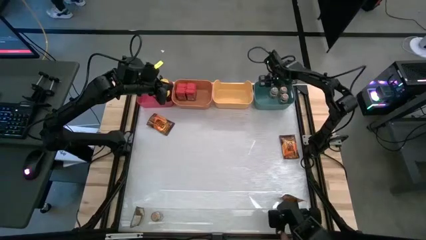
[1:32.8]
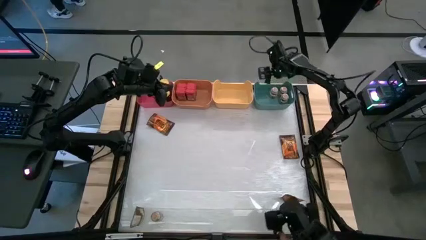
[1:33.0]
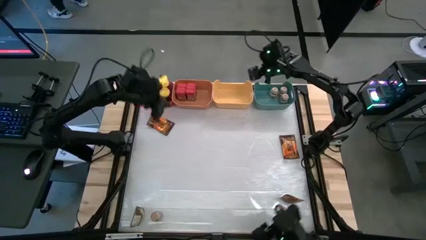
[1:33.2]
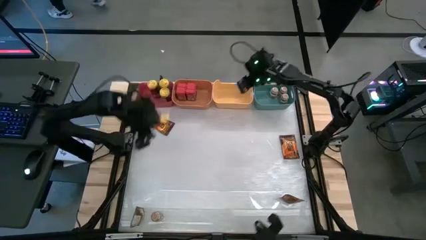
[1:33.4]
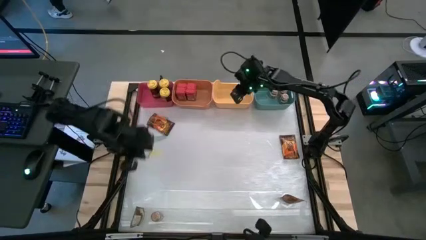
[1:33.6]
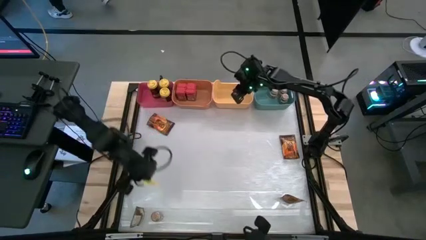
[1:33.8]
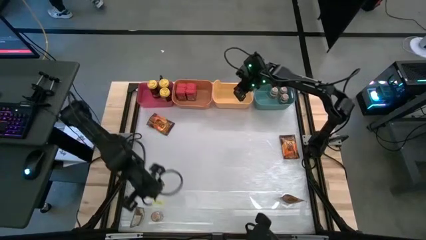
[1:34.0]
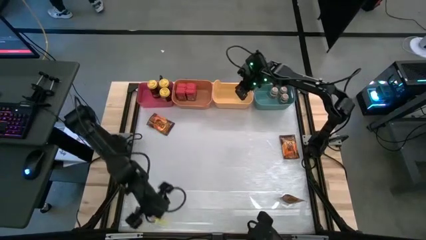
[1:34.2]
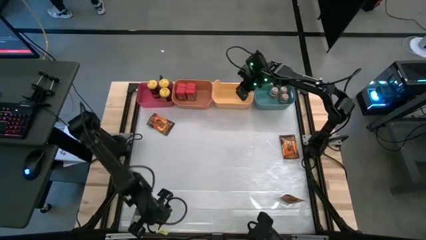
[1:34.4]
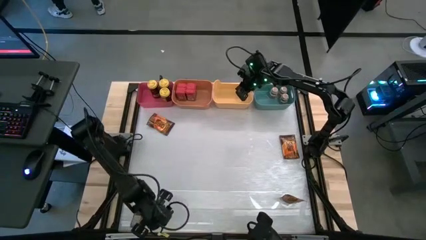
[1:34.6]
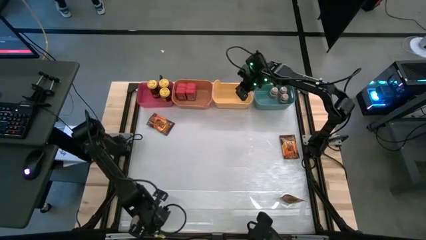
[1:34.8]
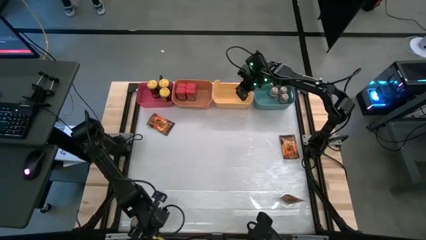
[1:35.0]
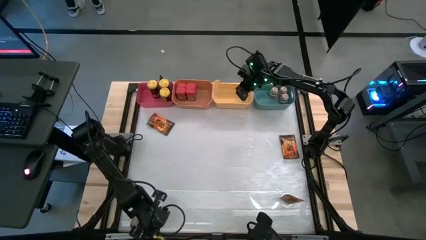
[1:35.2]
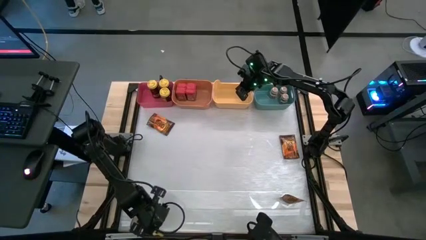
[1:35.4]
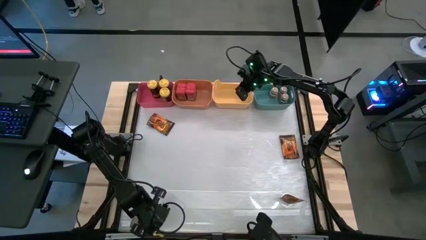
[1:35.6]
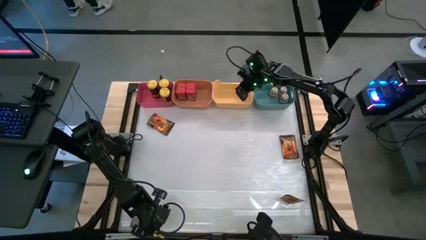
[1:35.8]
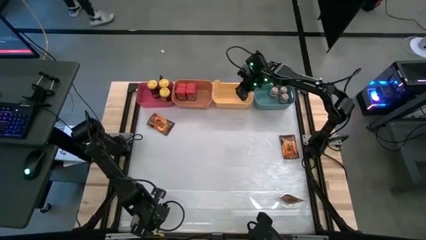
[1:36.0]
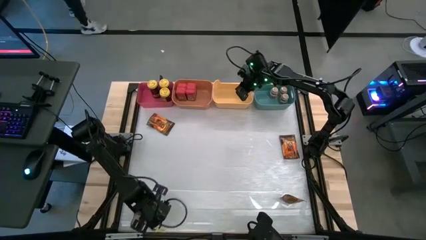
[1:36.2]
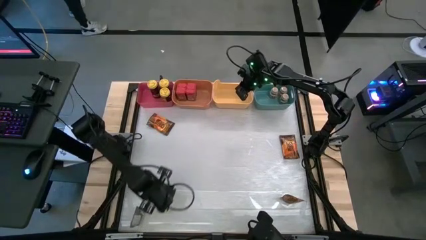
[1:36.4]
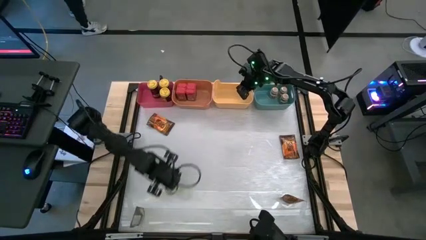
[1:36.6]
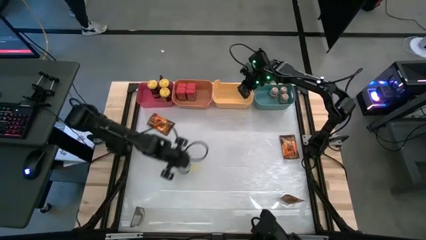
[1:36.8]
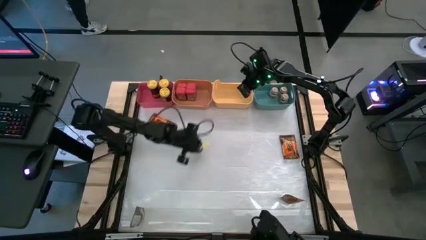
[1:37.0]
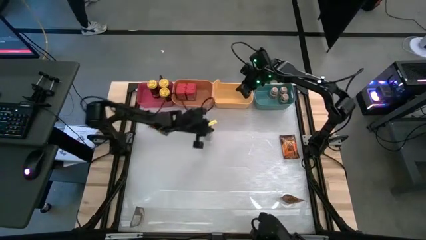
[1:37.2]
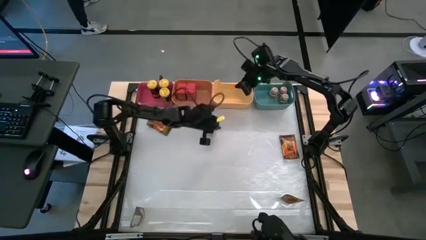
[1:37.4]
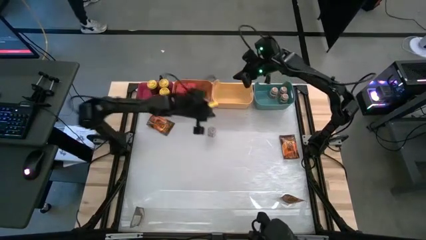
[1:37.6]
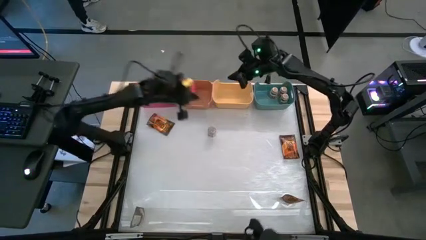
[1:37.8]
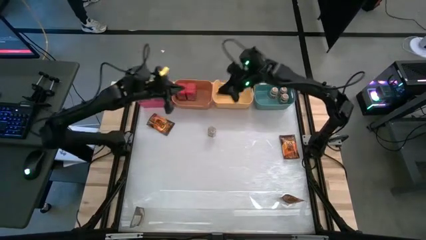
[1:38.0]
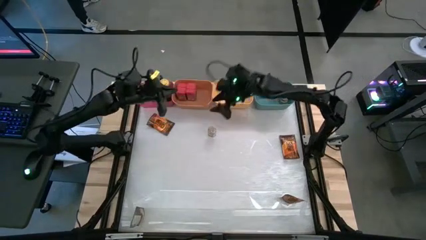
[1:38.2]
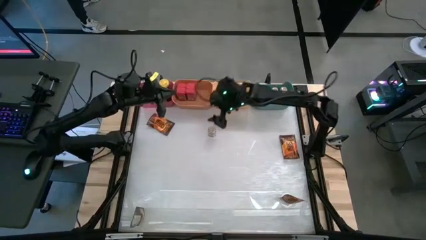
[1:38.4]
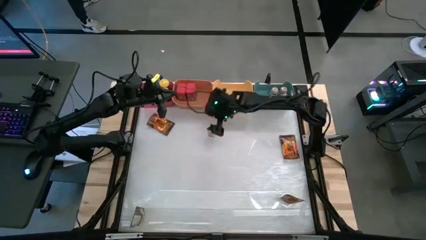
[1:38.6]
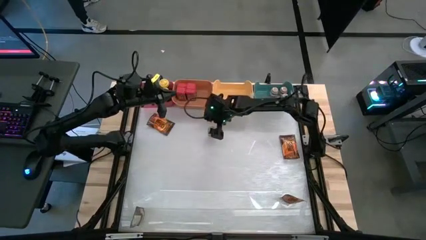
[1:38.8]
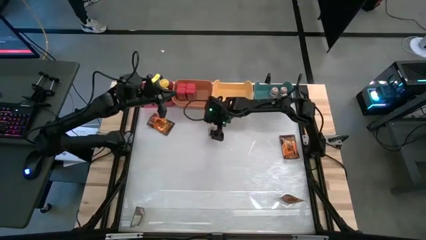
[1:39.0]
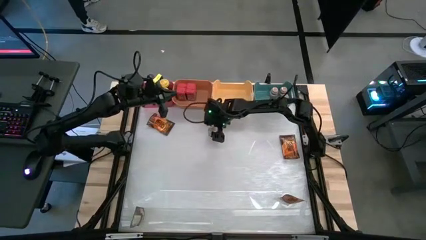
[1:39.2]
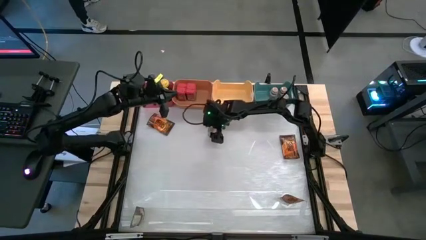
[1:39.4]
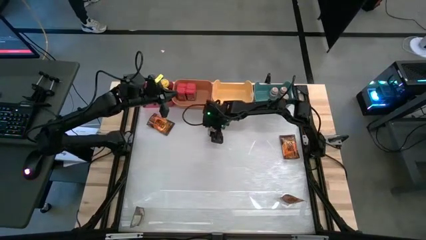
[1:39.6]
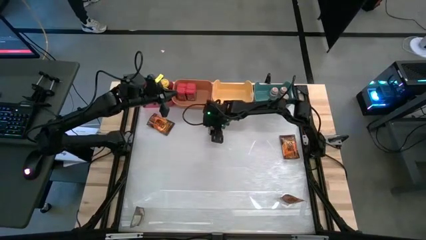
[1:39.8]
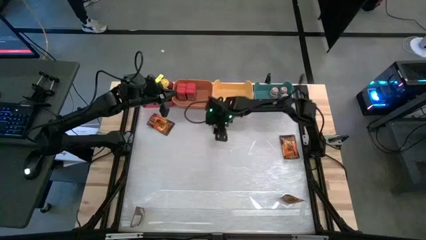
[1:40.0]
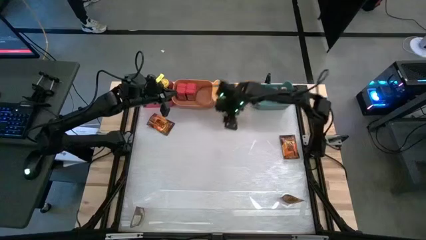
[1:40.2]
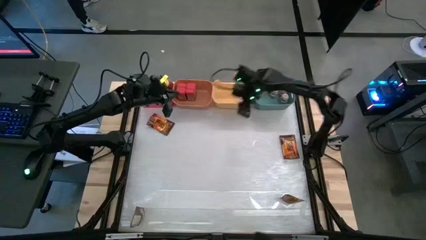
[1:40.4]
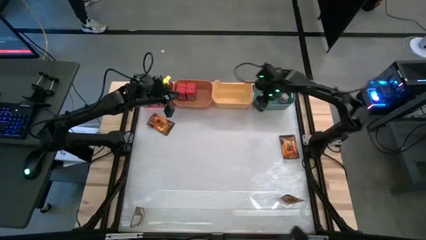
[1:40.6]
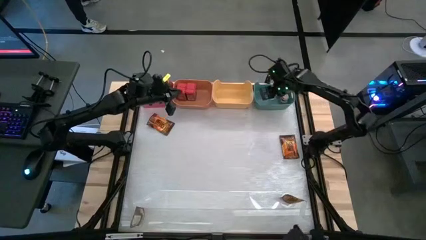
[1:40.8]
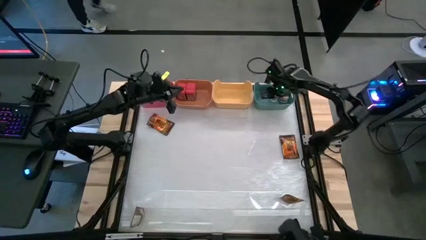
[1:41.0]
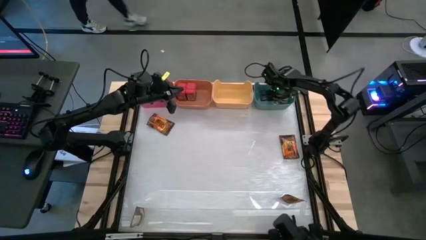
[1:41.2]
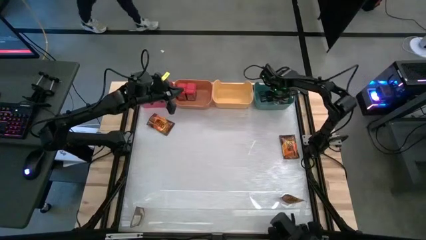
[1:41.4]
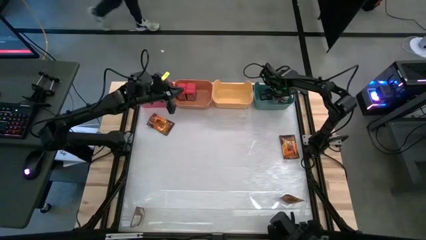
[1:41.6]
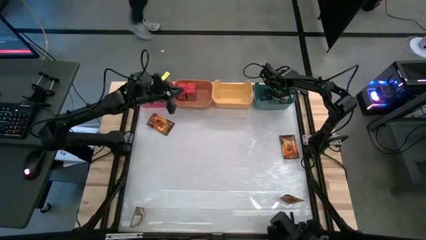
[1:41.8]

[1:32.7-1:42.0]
Task: Sort spices by type
Put the brown seasoning bottle into the blue bin

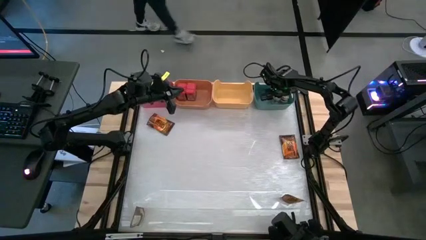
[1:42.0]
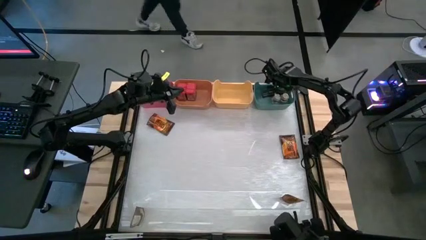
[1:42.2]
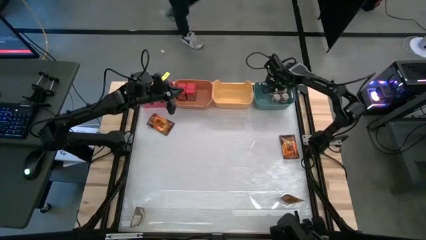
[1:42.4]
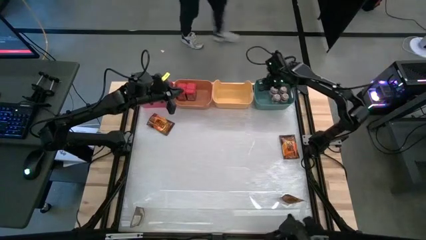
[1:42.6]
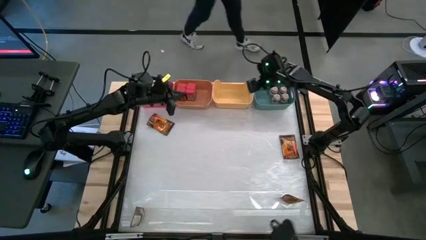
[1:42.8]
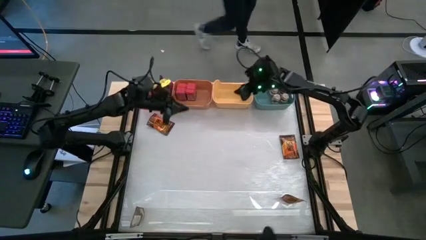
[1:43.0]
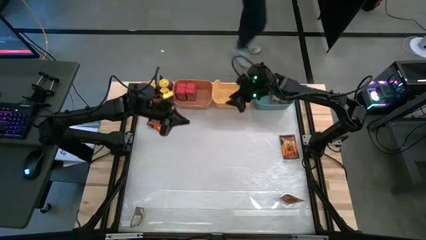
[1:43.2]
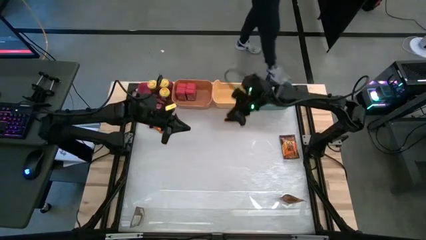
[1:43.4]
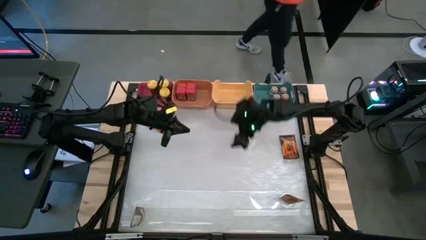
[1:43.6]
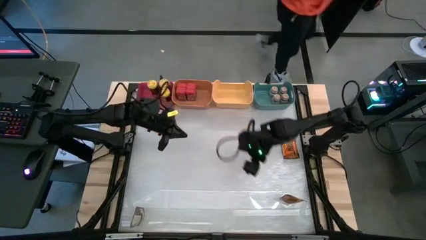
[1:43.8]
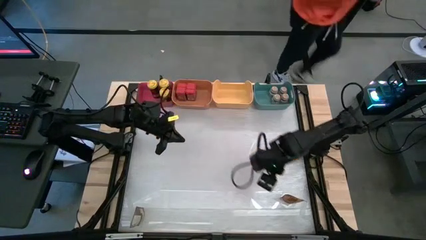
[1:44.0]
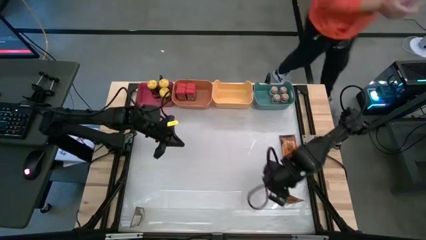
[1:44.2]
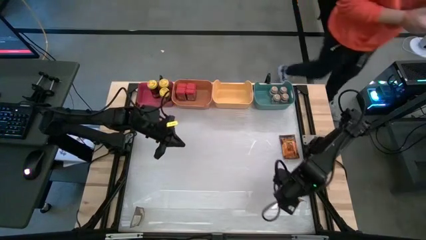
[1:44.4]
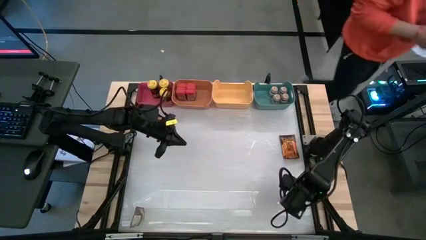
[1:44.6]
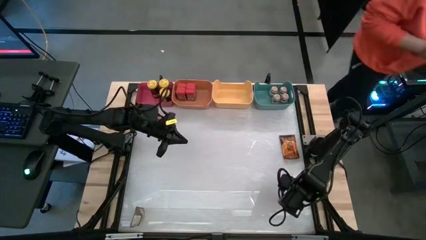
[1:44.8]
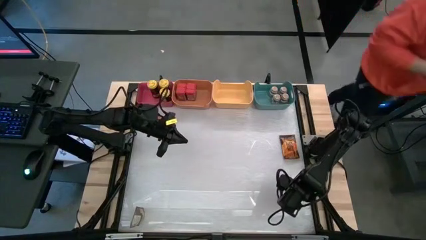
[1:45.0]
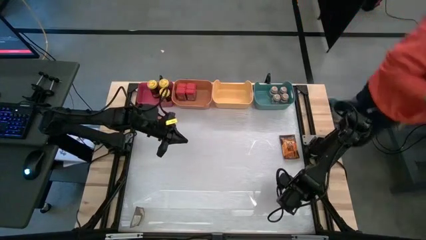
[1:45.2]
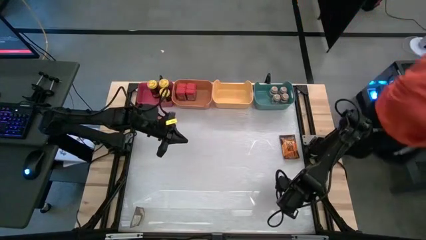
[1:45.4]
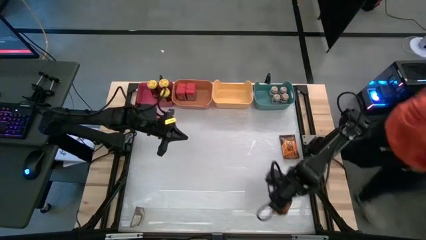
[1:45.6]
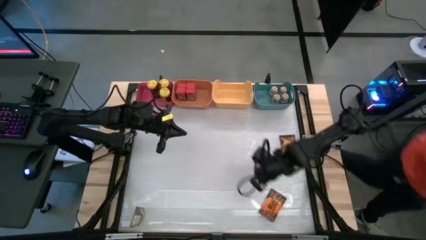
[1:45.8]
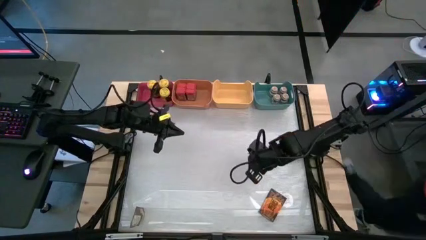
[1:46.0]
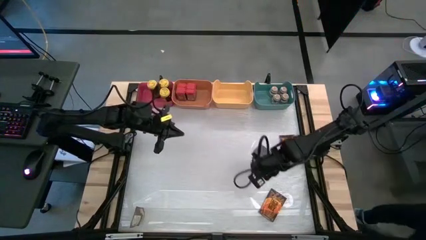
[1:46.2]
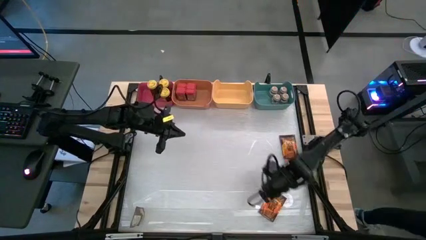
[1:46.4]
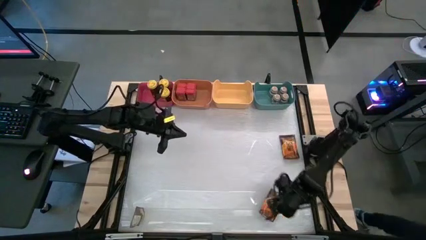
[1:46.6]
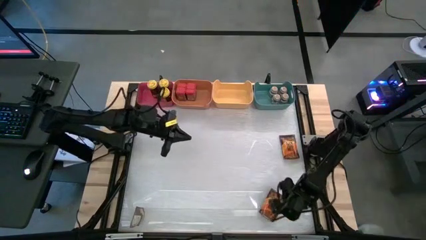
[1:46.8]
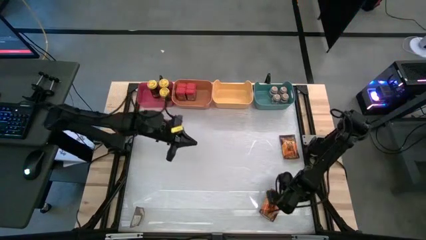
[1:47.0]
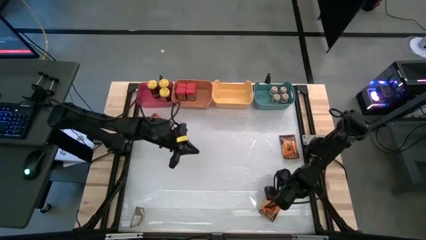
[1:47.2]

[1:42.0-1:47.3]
Put the bottom orange seasoning pack into the yellow bin

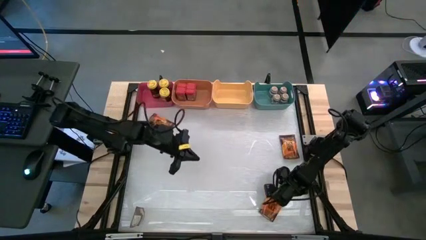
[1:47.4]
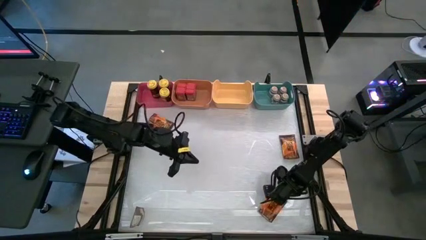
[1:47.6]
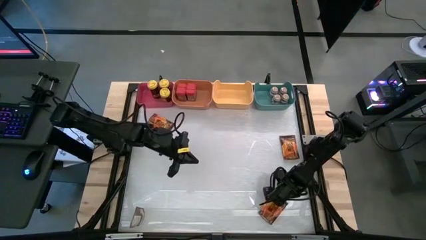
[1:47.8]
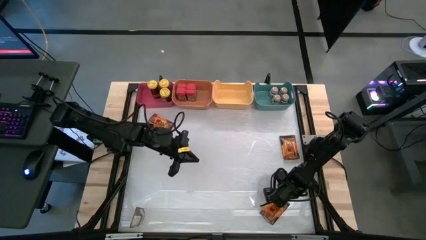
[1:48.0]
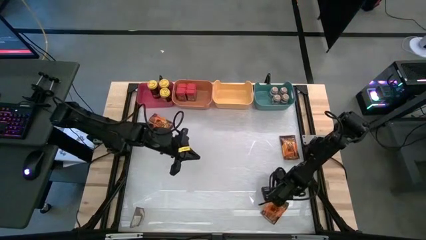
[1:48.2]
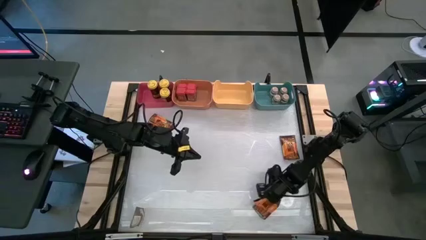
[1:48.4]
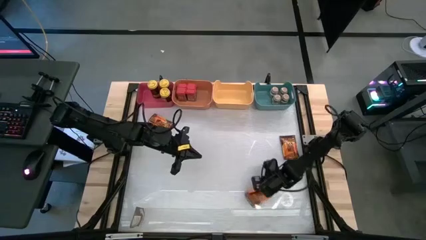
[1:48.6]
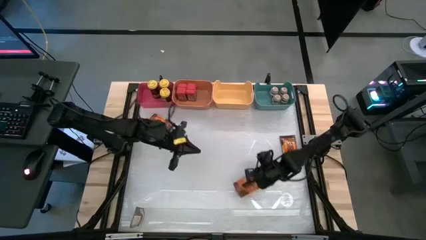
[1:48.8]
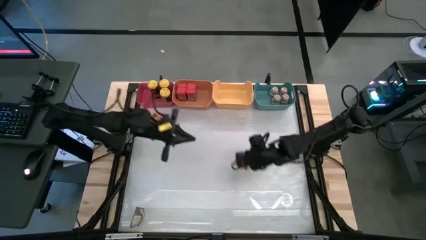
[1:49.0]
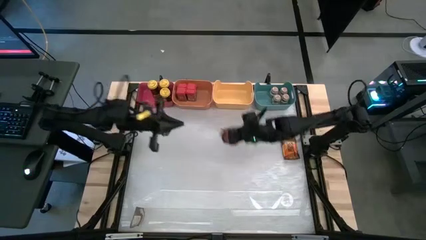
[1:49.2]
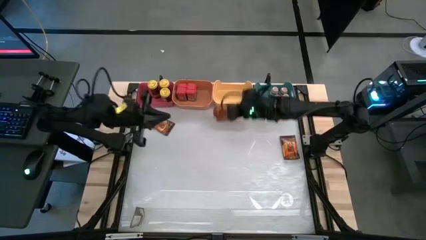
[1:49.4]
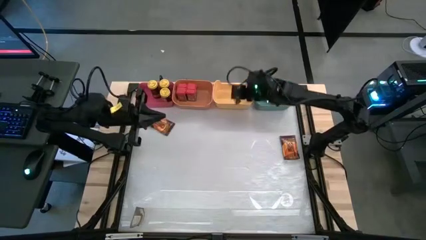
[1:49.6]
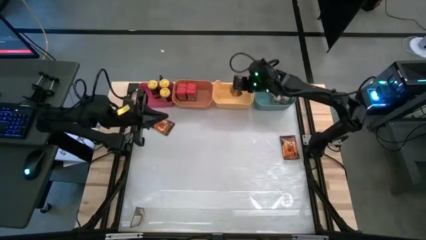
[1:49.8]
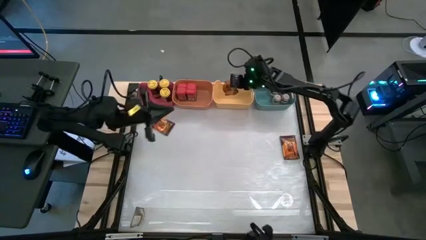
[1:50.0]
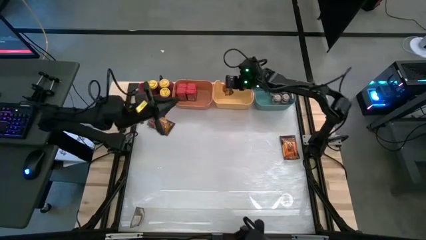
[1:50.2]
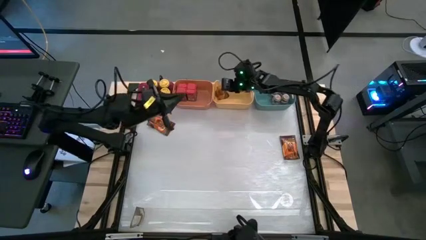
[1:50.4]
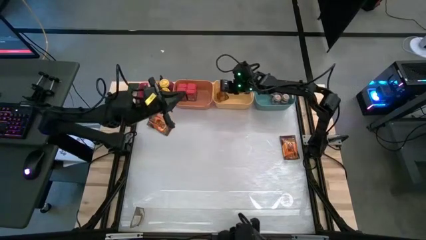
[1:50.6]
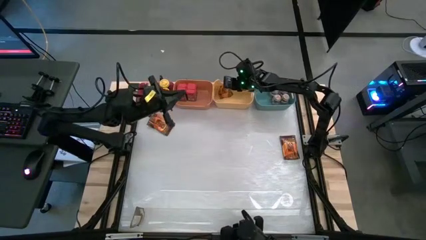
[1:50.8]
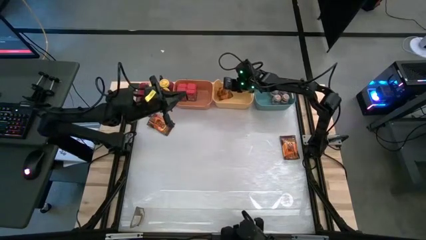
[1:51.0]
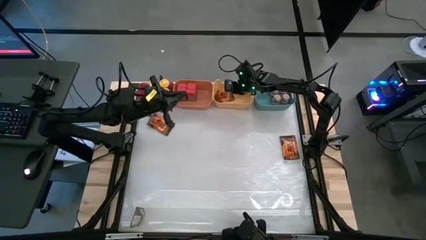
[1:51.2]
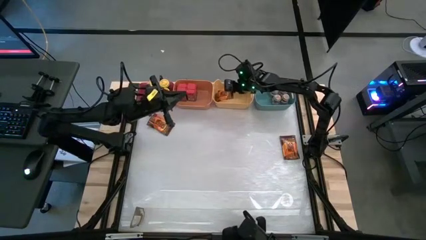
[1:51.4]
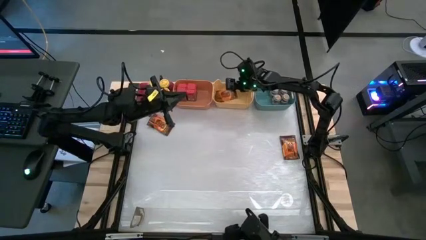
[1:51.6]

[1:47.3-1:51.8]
Put the bottom orange seasoning pack into the yellow bin
